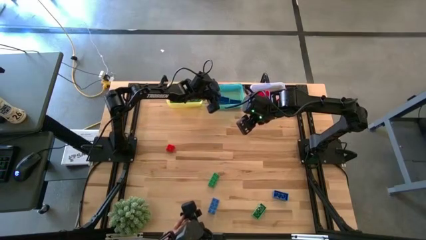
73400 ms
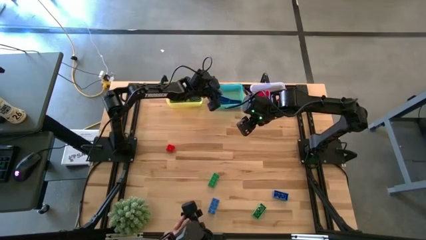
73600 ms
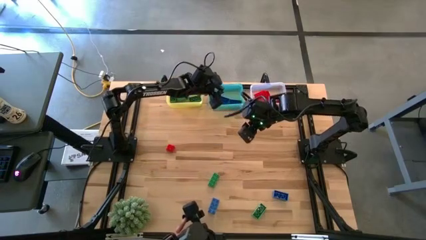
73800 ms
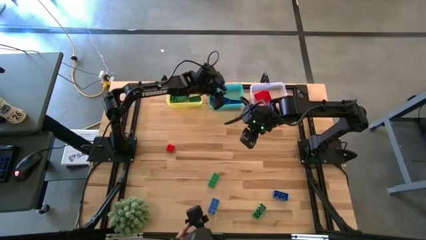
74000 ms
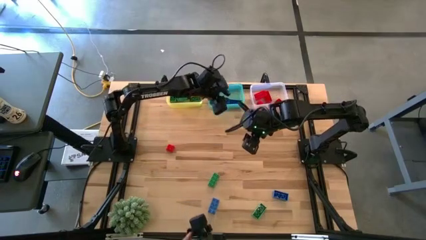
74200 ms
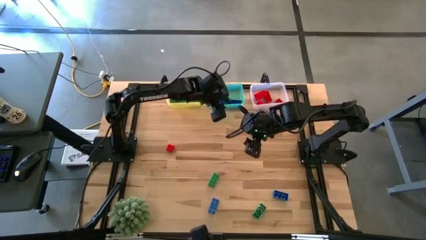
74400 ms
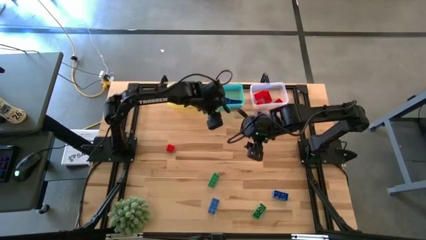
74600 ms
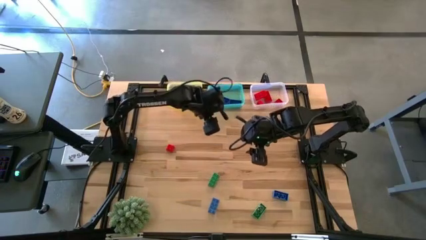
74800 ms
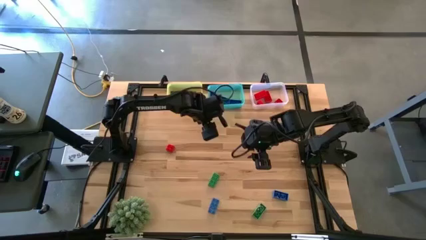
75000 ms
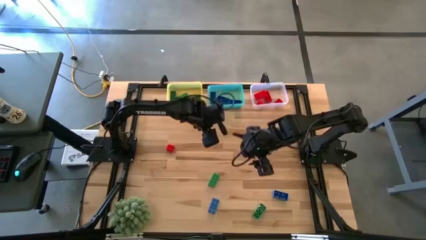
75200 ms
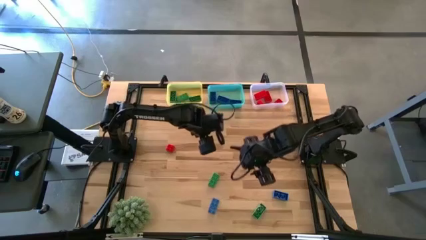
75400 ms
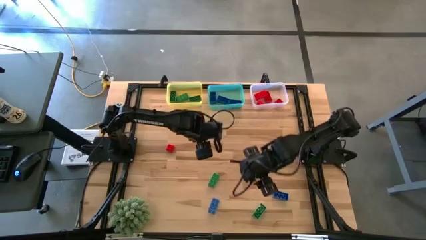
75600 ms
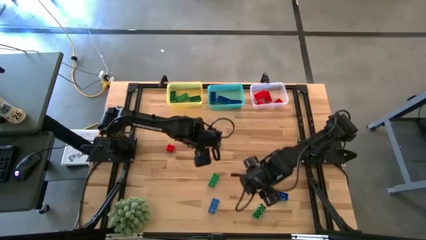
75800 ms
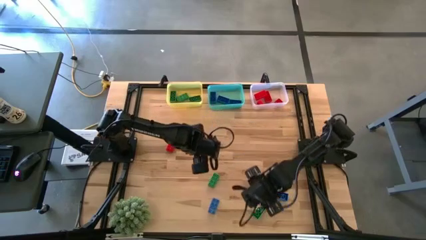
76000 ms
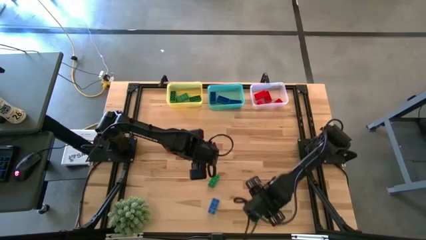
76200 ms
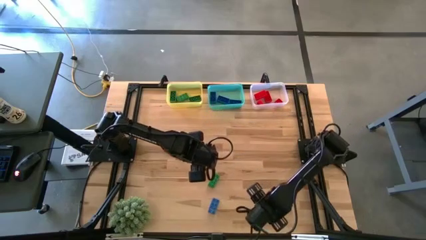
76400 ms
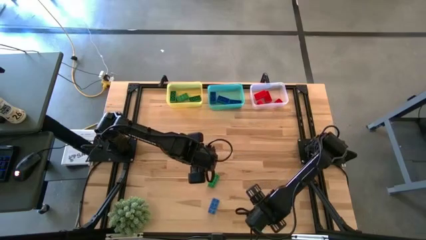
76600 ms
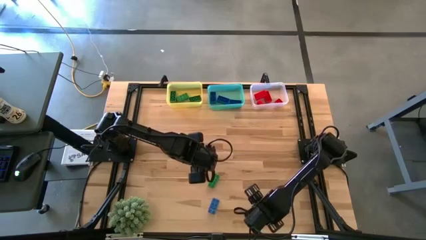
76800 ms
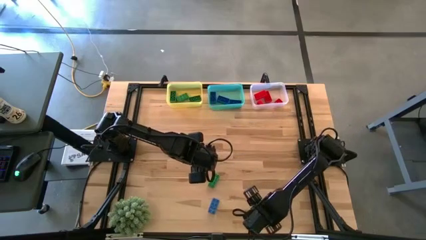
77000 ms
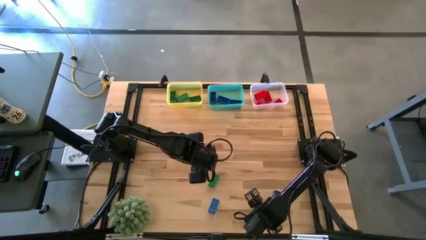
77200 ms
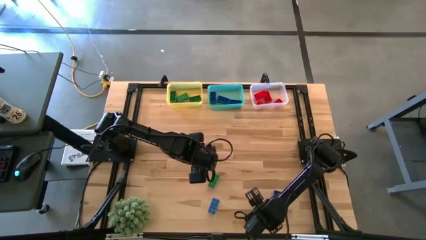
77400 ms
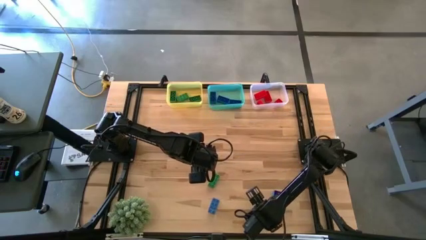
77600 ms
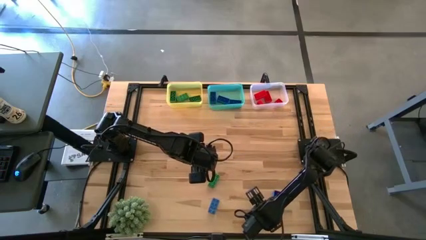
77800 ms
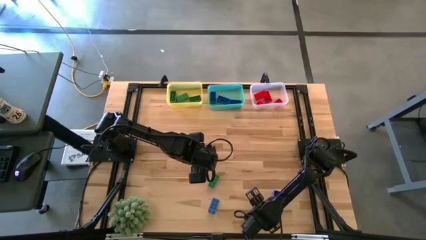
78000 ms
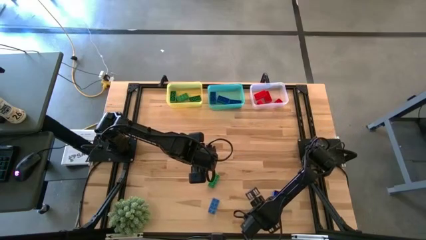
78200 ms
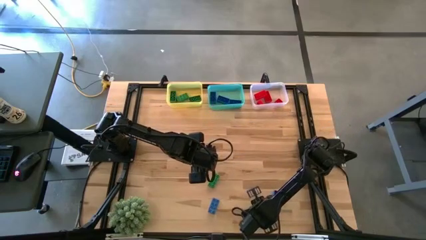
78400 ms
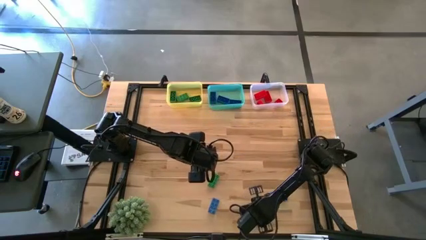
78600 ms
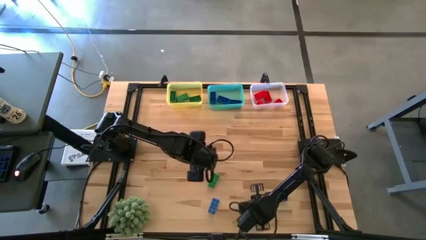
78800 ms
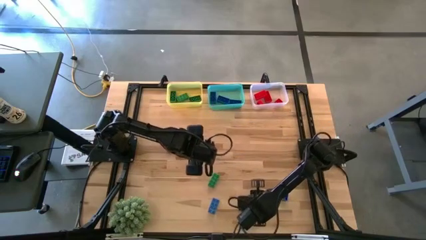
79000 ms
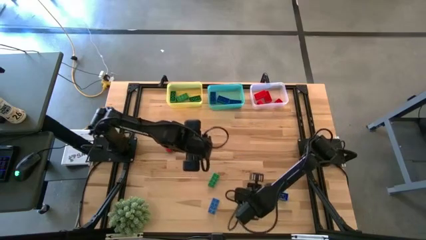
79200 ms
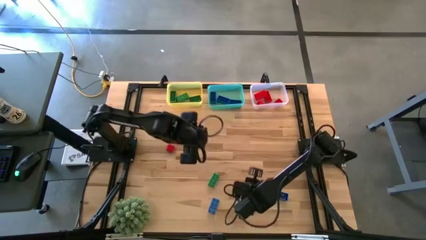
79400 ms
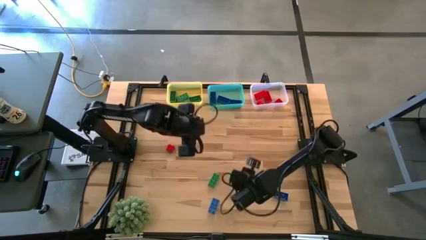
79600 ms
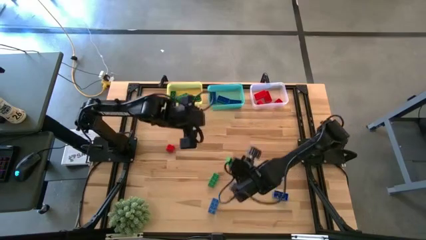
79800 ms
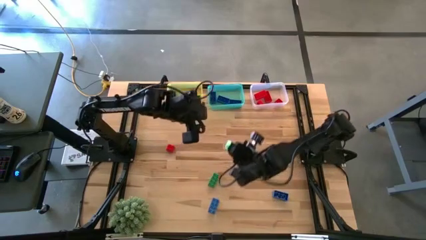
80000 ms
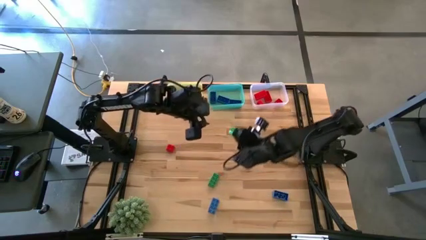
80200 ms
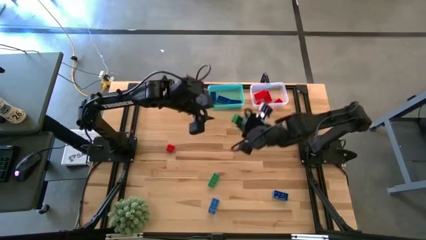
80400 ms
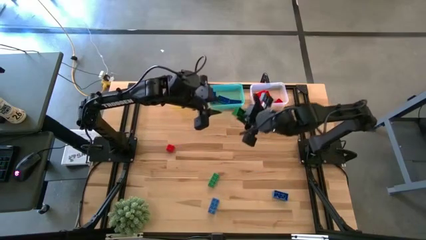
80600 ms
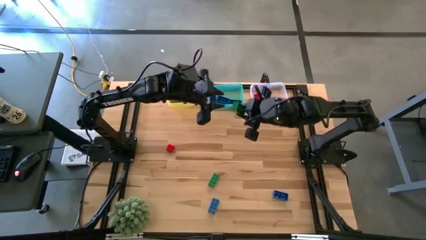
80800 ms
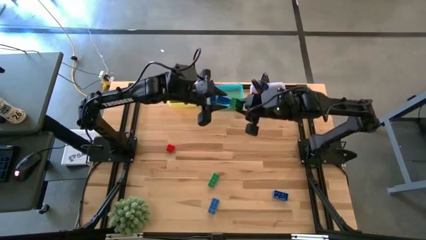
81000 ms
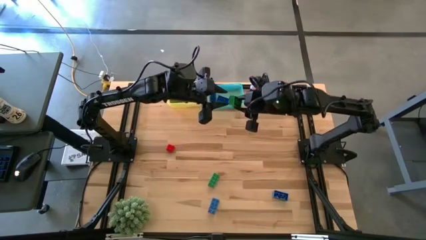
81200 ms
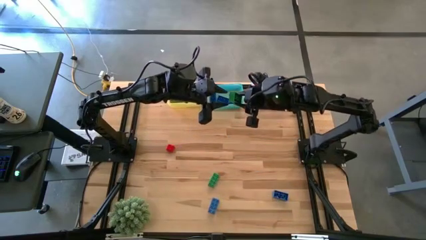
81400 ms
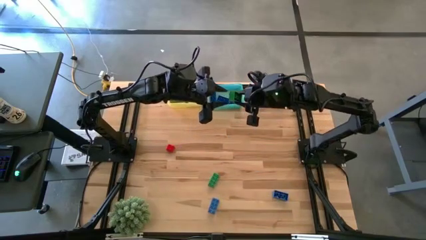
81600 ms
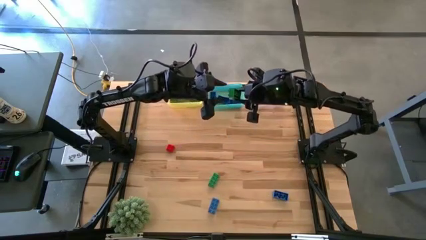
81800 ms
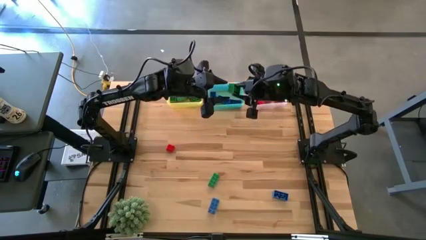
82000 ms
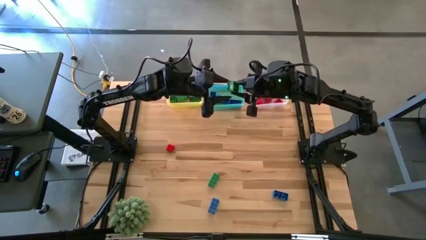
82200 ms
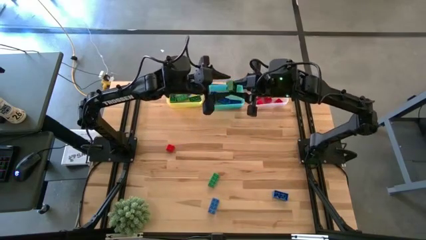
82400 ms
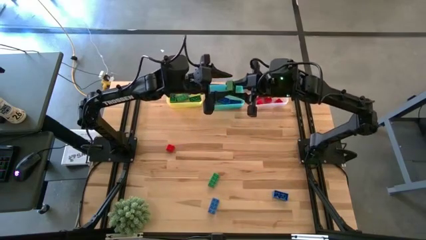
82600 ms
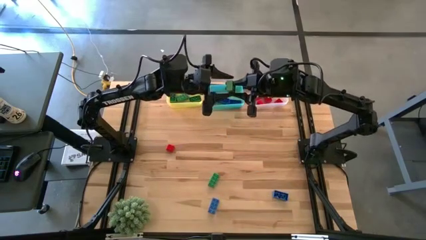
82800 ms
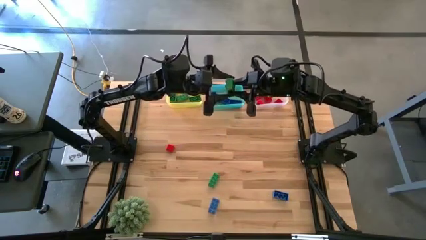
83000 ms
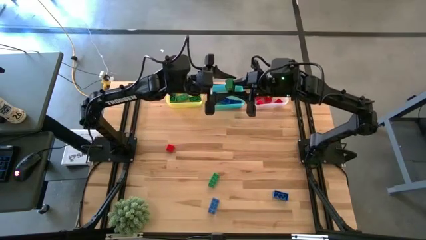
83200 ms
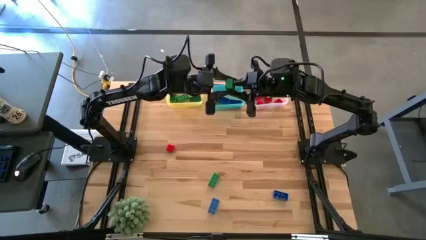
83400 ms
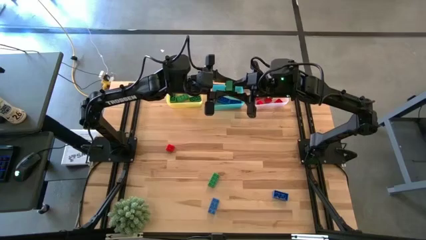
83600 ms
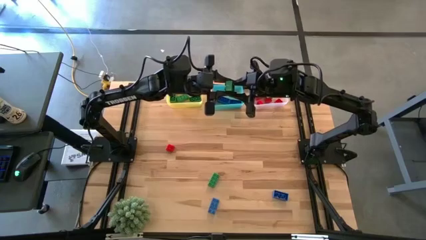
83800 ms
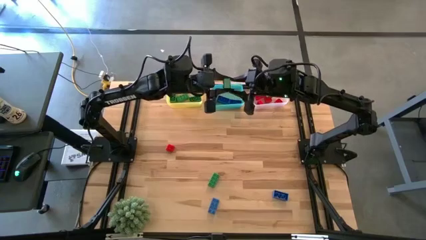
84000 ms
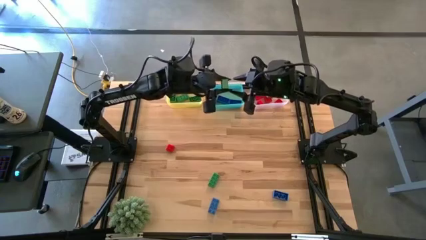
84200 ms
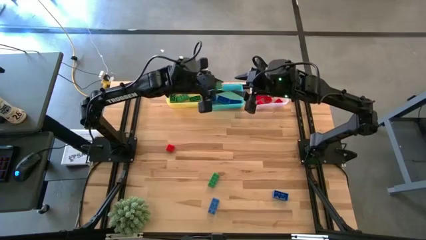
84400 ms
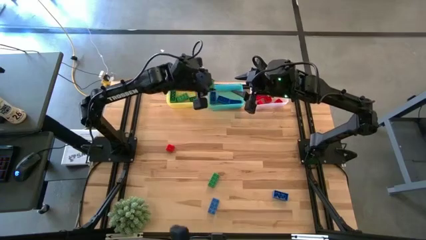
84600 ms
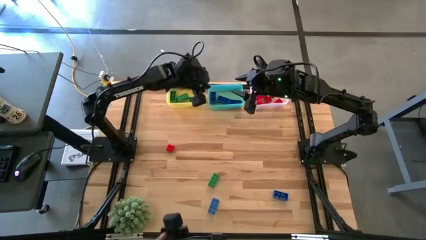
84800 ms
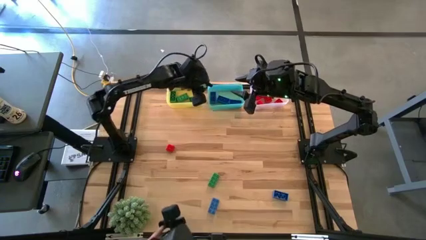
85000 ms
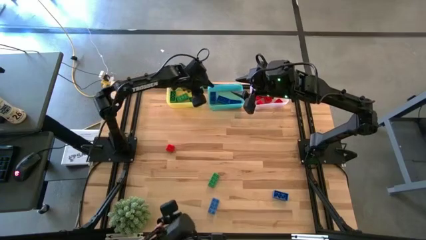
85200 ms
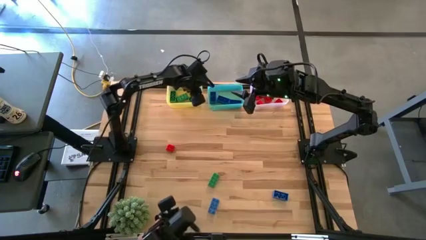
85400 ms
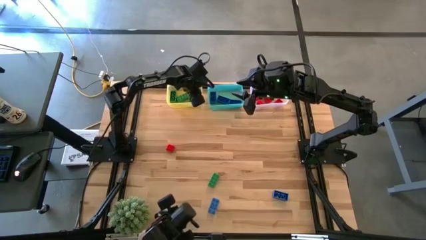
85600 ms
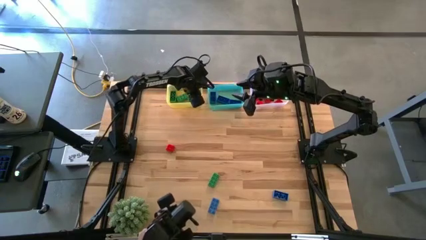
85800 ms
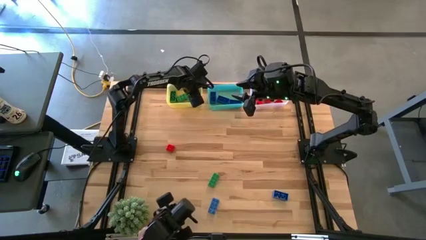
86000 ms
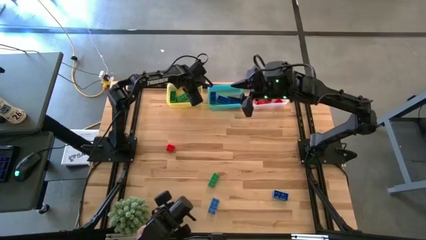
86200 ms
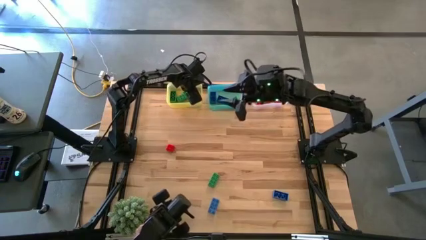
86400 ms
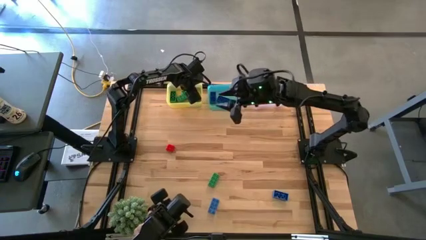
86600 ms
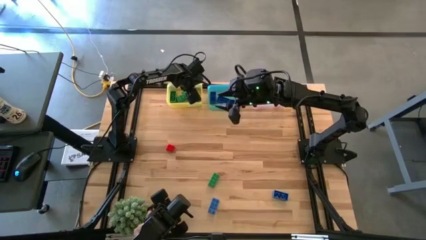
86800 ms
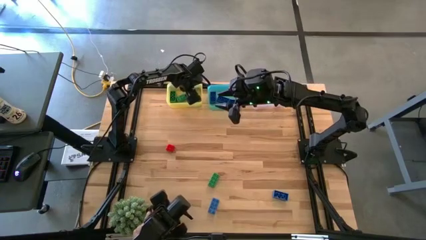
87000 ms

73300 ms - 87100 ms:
Task: Sort & place blocks by color
Put the green game piece into the yellow bin
